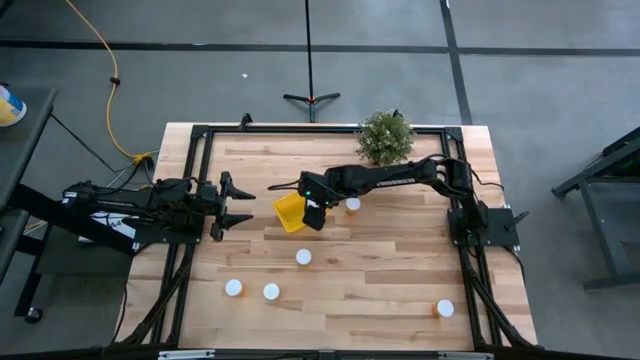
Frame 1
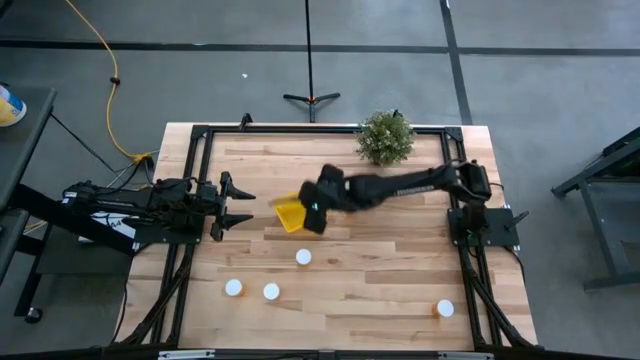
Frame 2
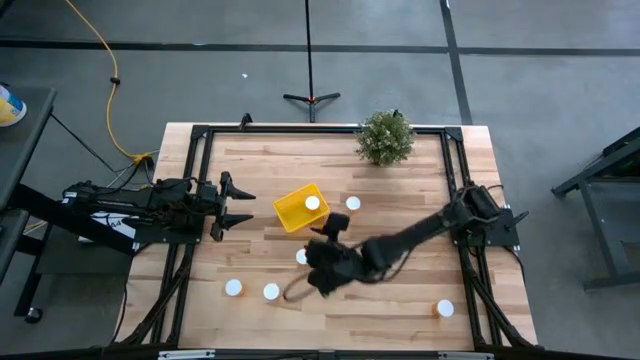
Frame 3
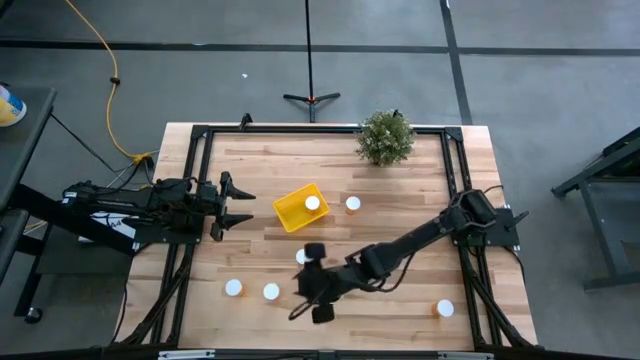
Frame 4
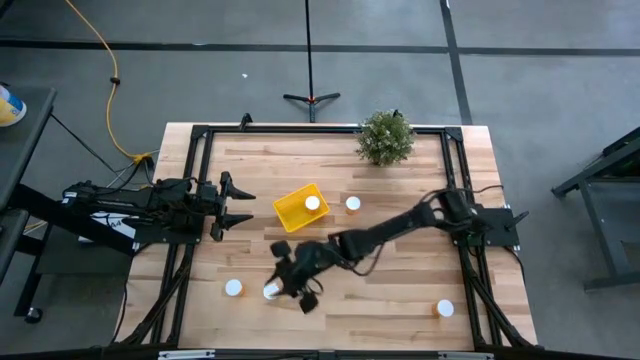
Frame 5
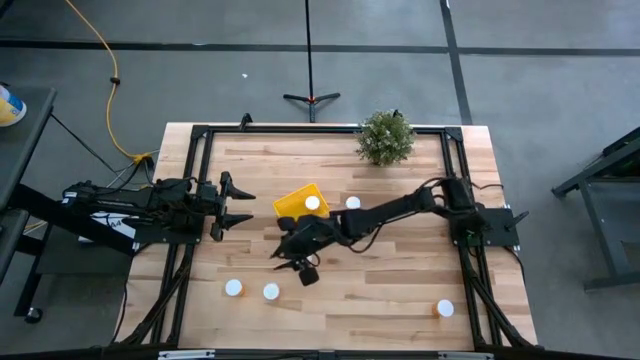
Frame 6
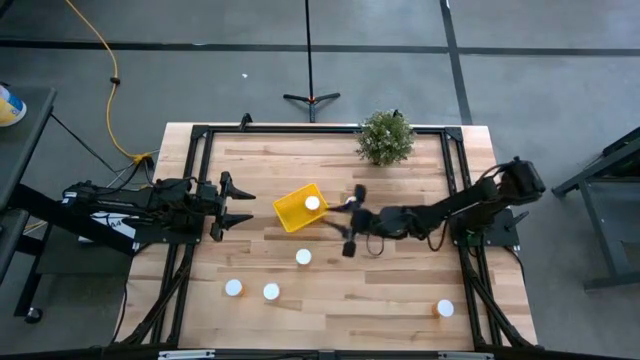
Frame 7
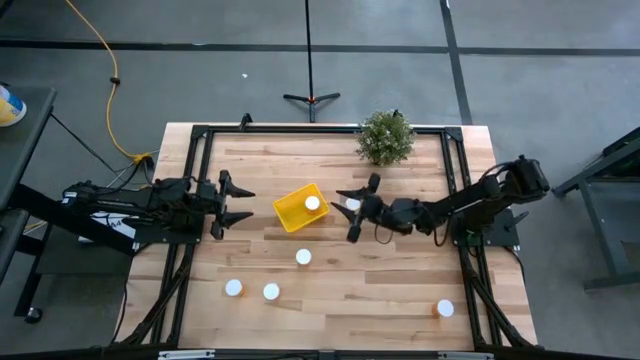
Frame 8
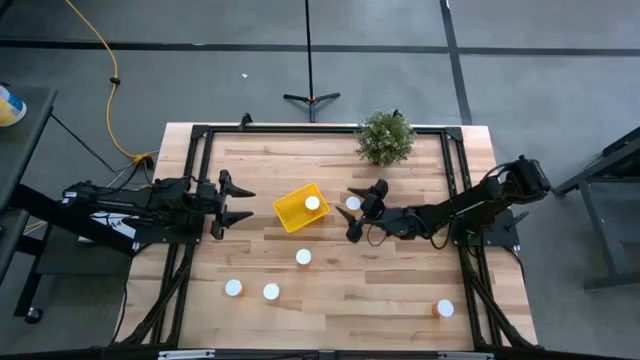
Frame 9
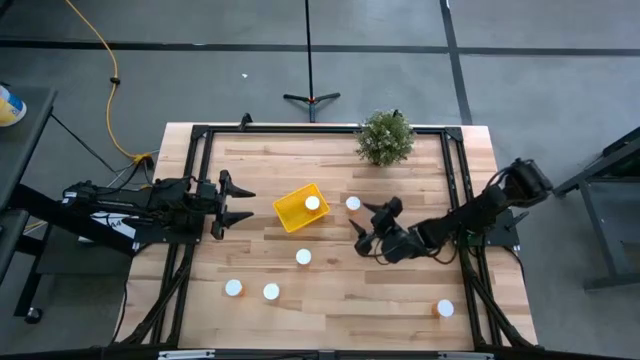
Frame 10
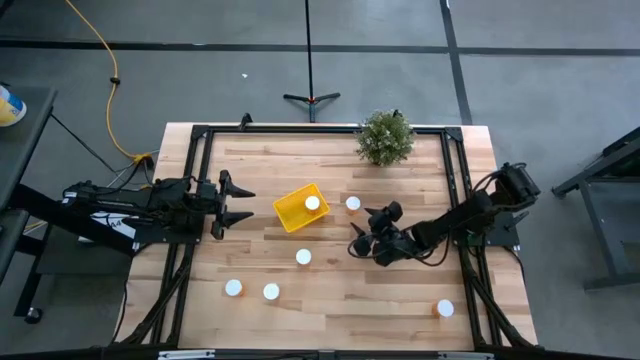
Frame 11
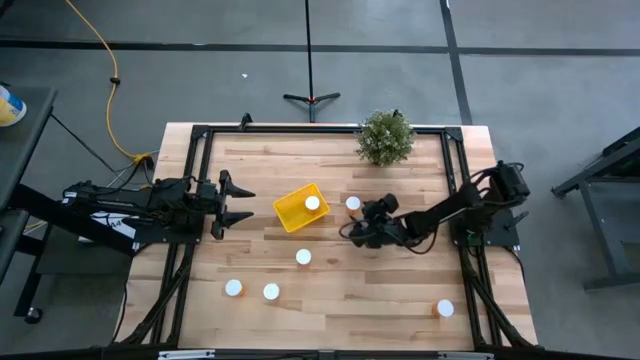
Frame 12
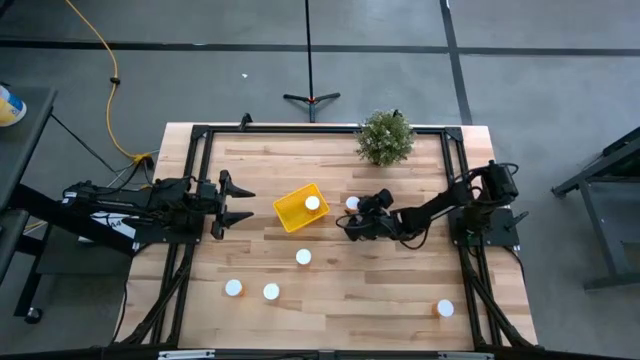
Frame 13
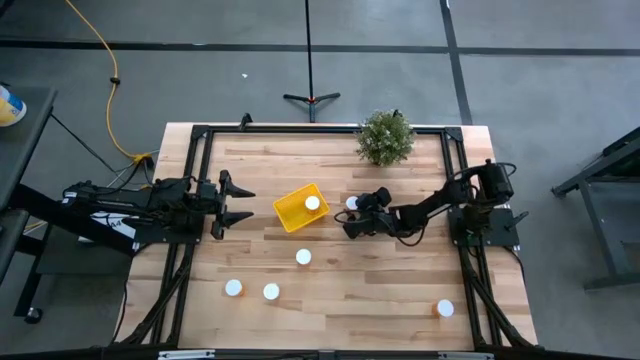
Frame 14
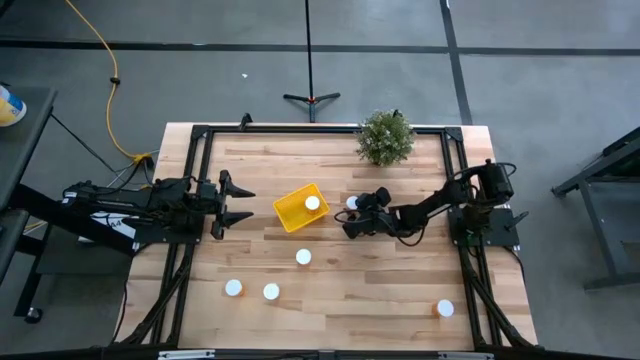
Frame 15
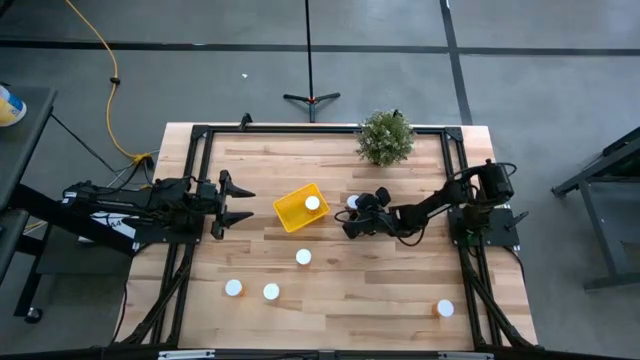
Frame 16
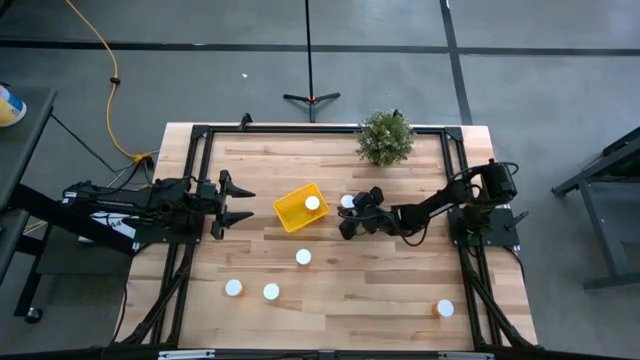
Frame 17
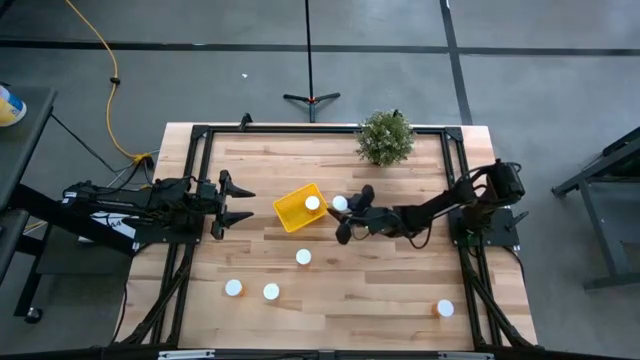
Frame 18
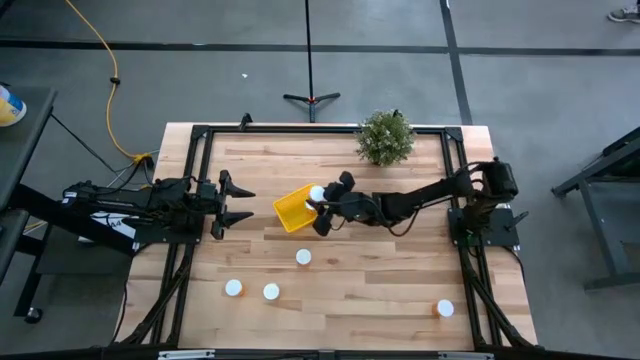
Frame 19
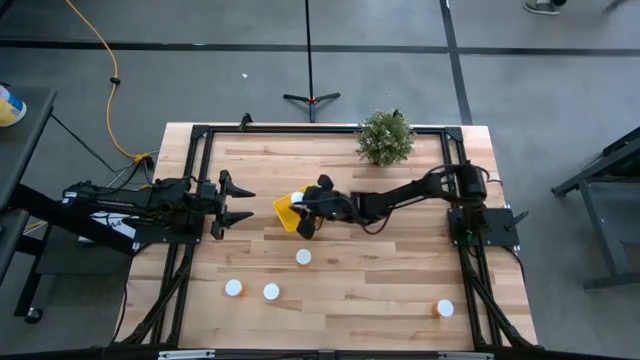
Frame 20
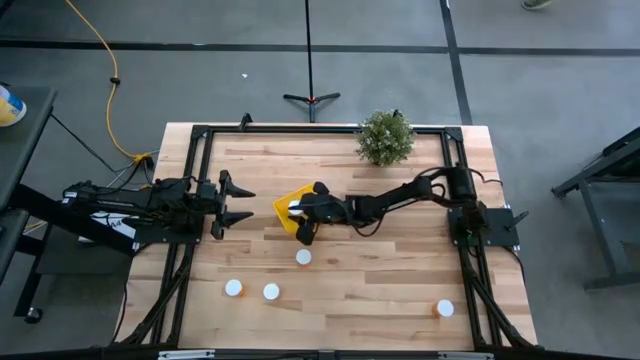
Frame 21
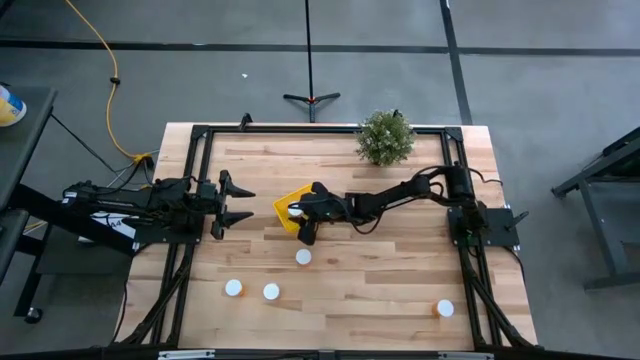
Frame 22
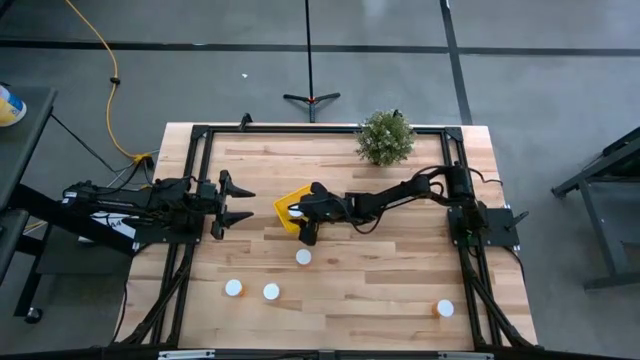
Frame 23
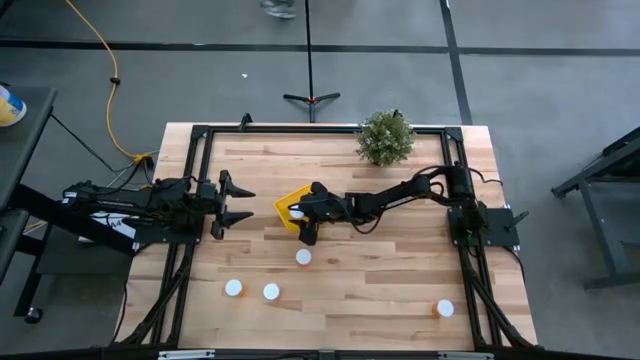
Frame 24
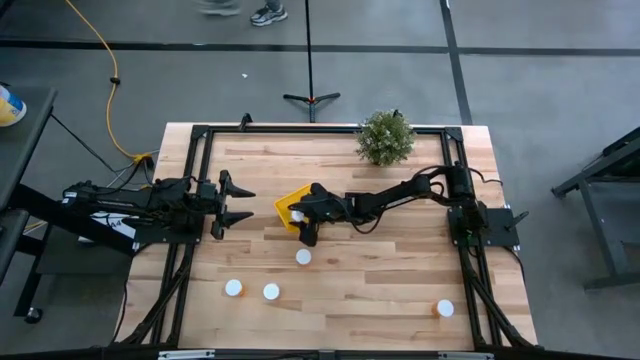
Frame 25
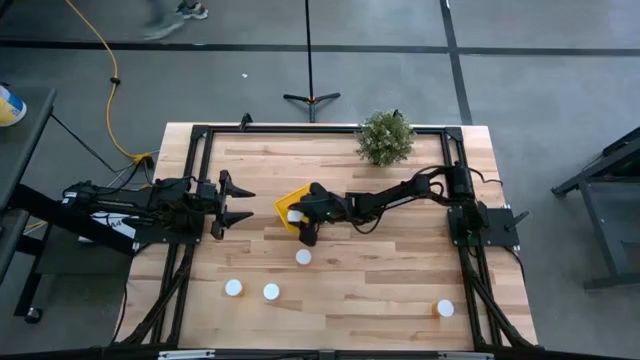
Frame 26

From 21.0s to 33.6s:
Task: Pick and place pill bottles into a basket
Put the yellow pill bottle into the bin

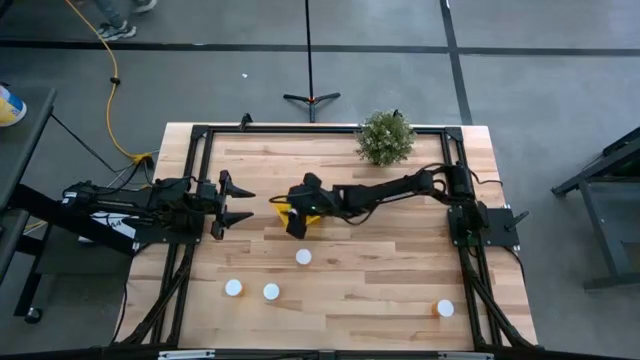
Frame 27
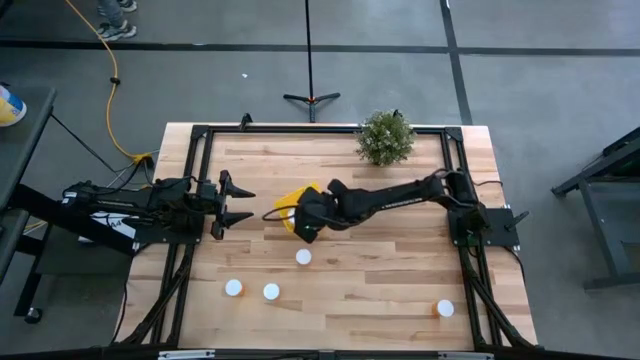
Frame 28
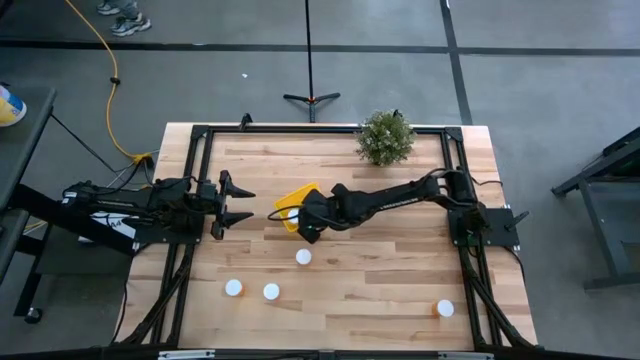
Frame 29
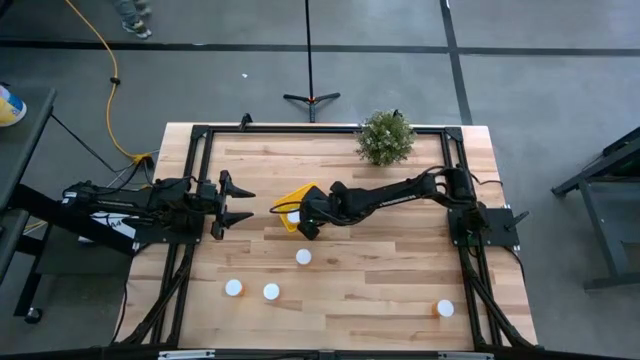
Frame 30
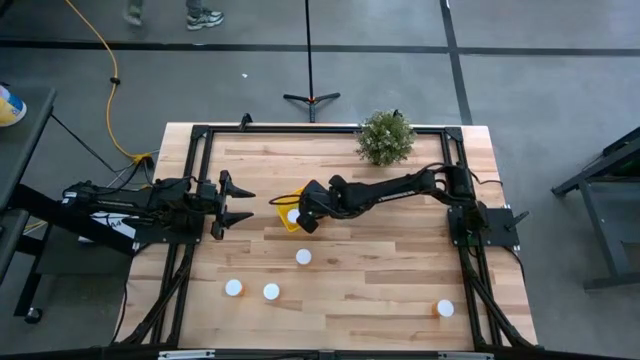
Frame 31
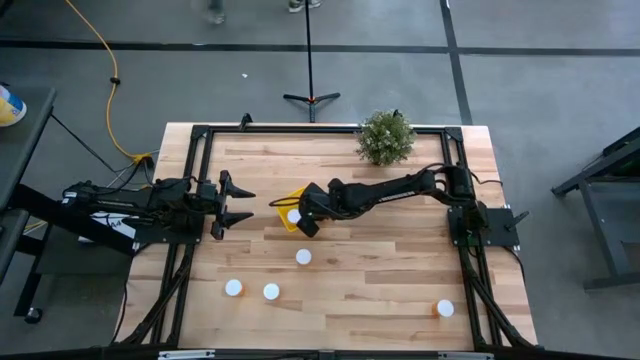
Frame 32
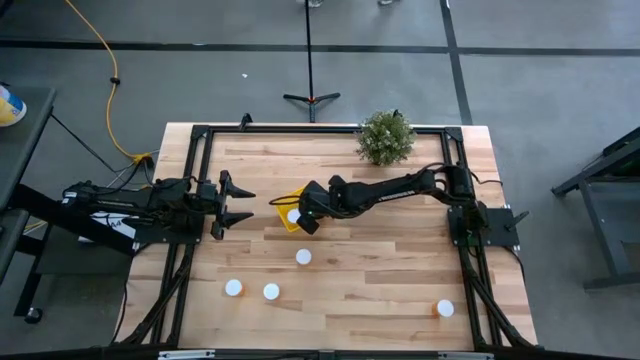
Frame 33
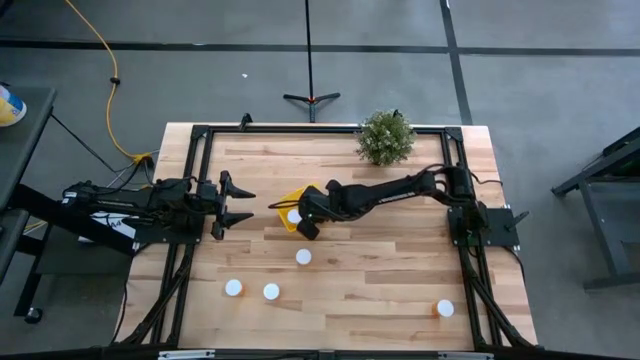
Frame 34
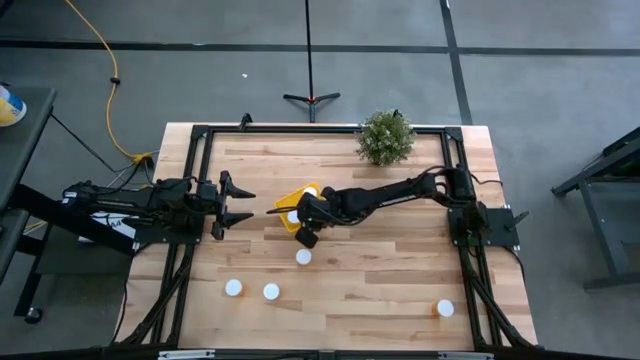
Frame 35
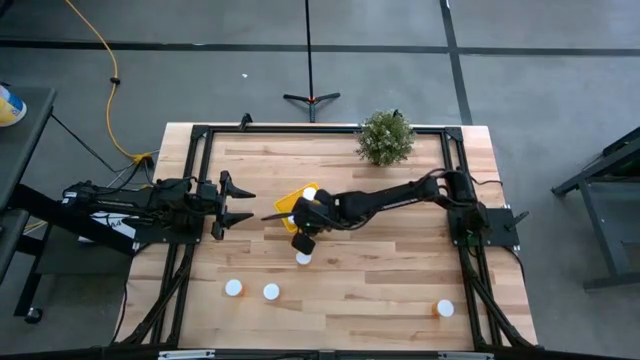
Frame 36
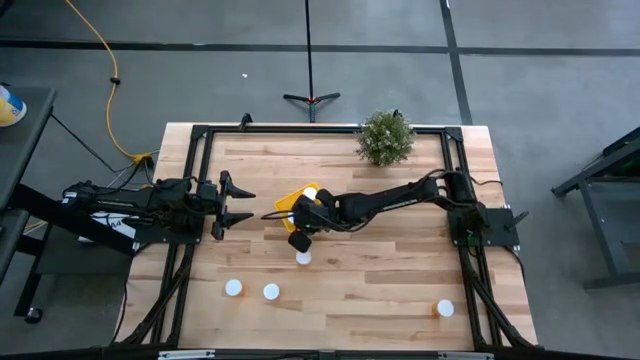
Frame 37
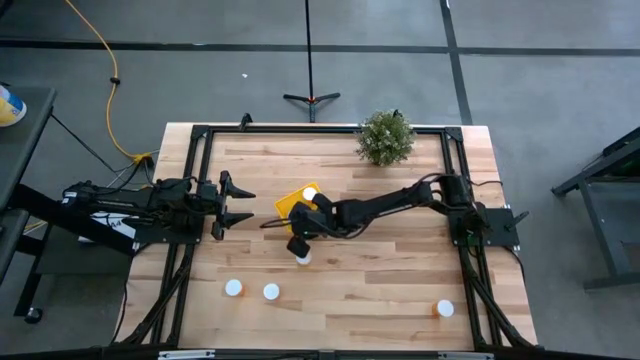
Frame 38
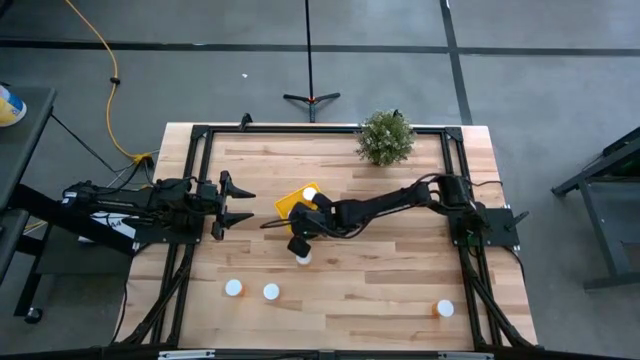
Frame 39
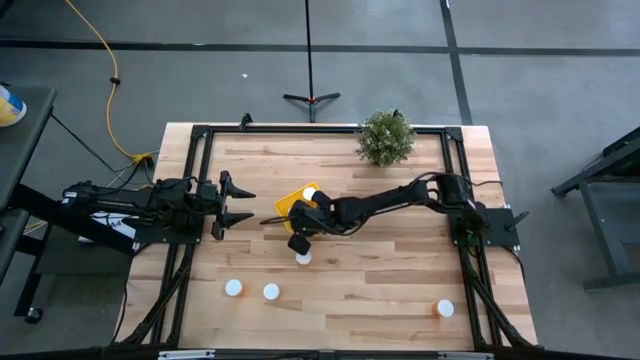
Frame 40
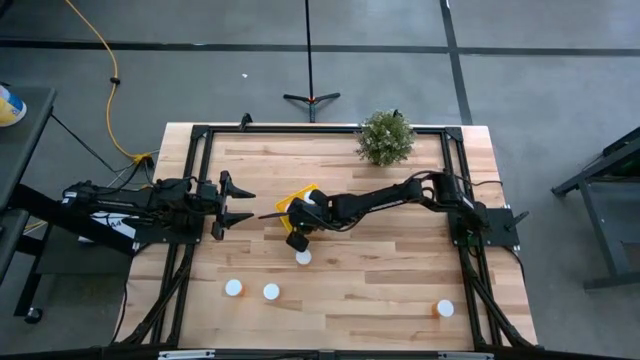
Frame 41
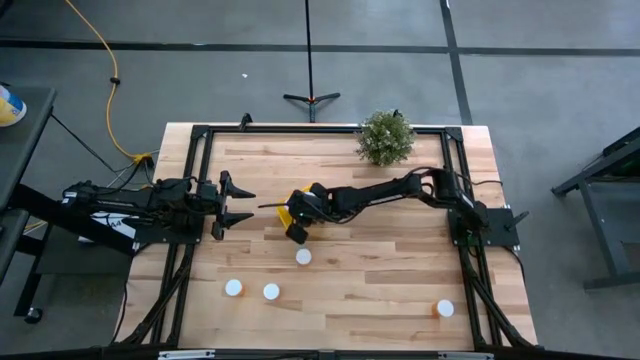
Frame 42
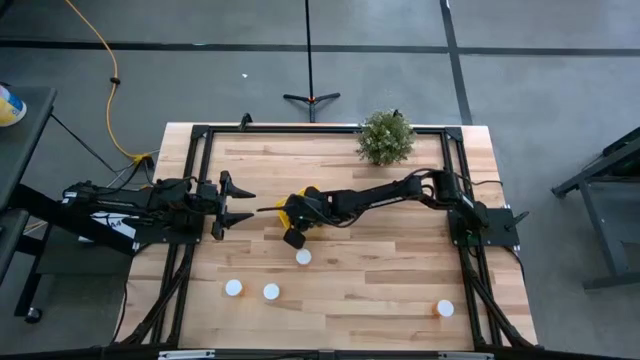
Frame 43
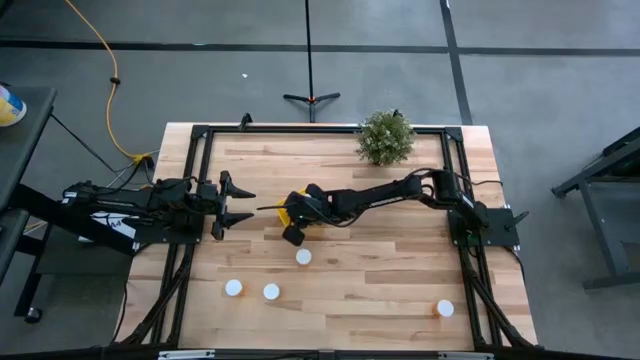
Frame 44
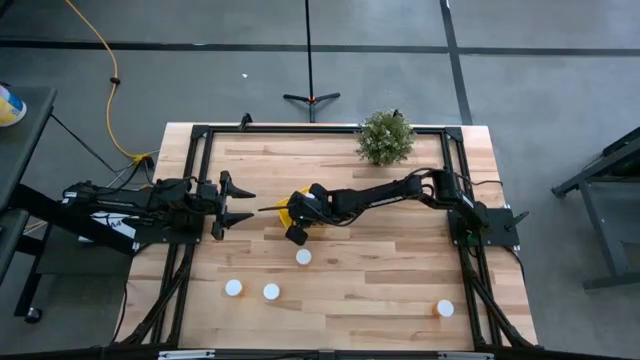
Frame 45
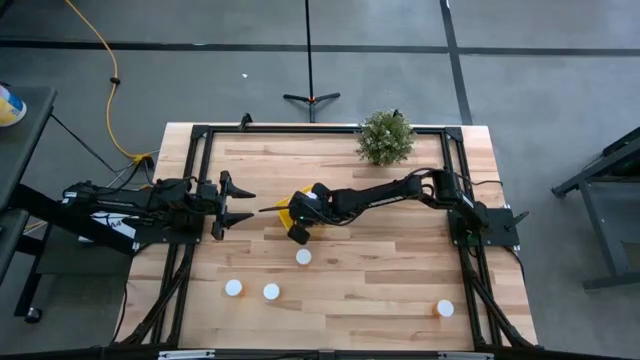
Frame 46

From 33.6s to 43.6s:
Adjust the yellow pill bottles in the bin
